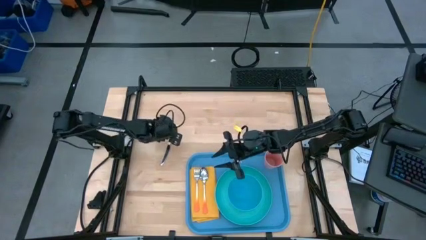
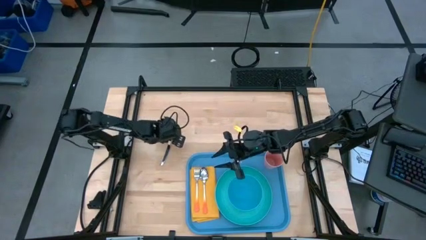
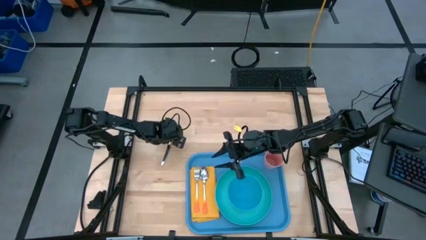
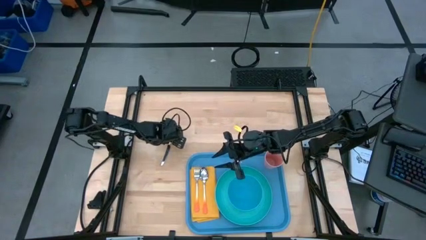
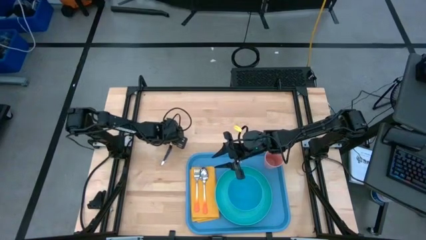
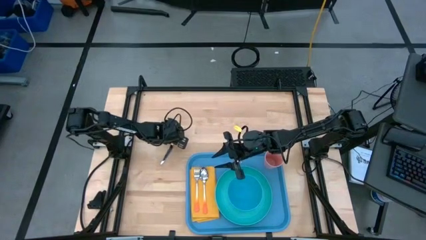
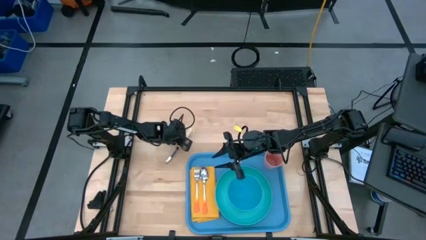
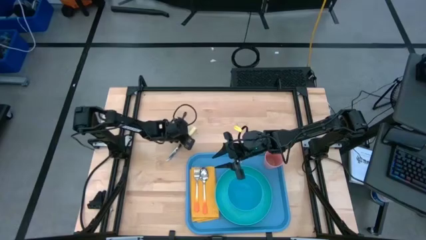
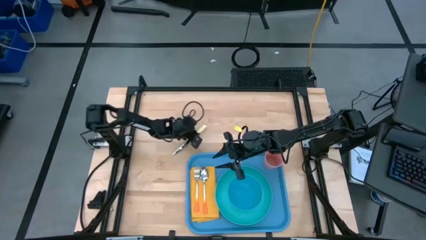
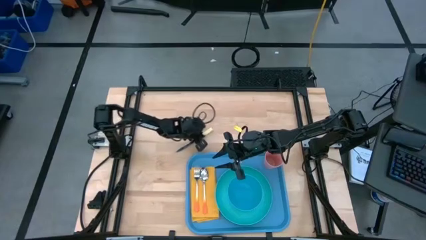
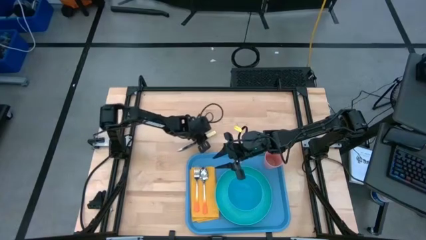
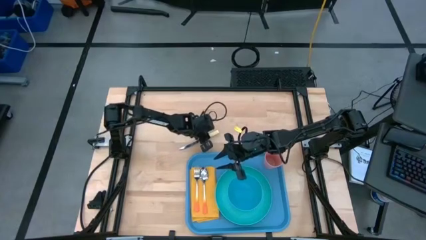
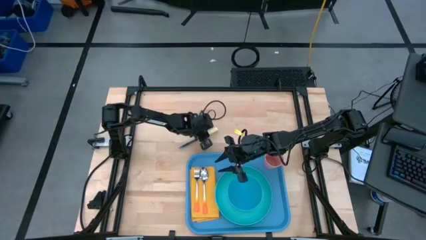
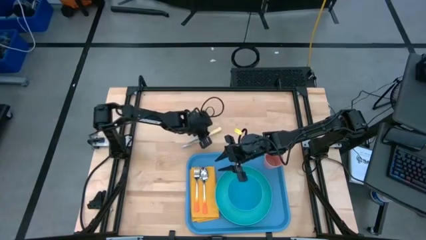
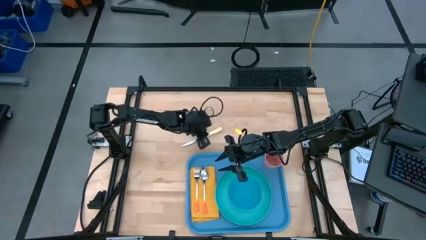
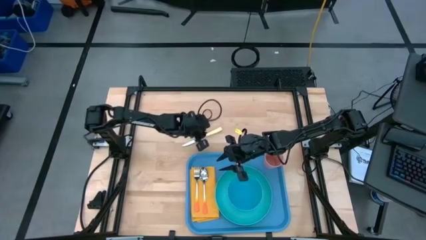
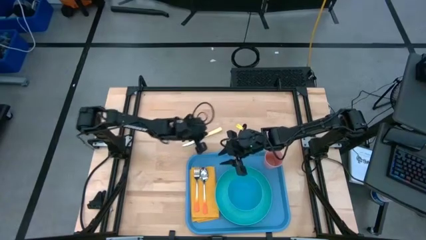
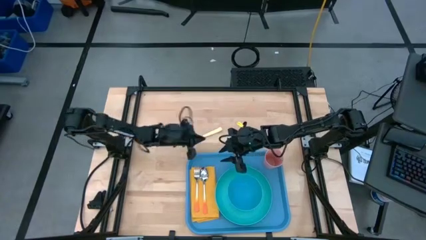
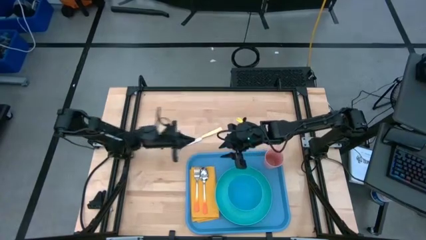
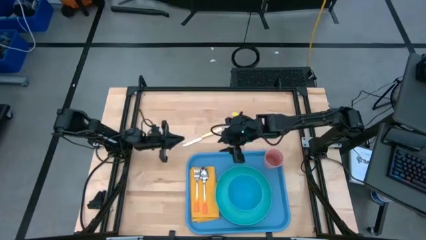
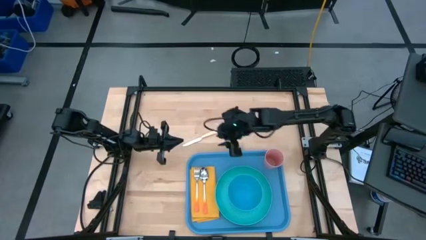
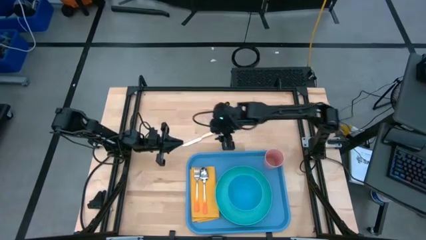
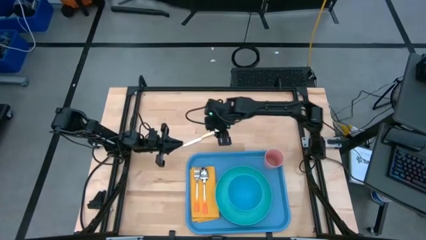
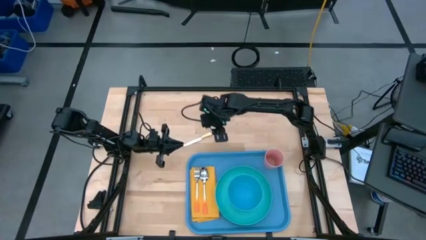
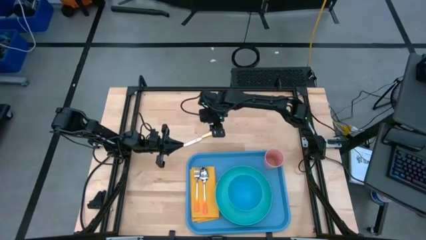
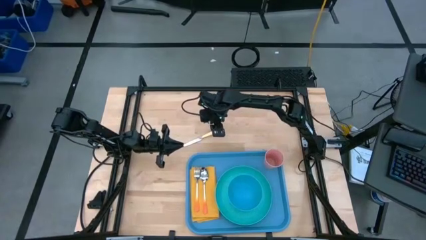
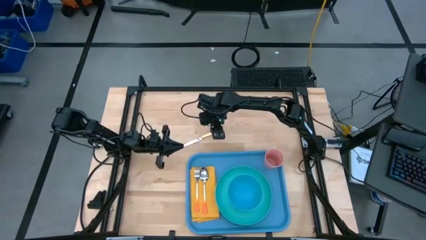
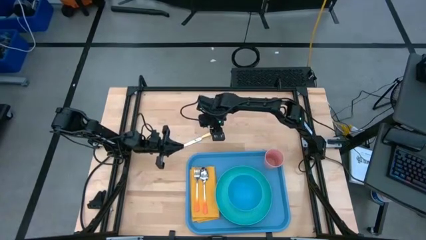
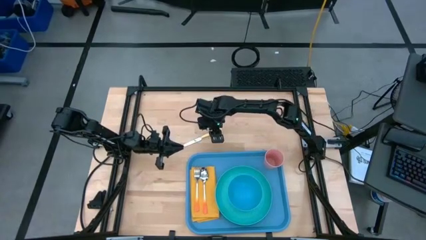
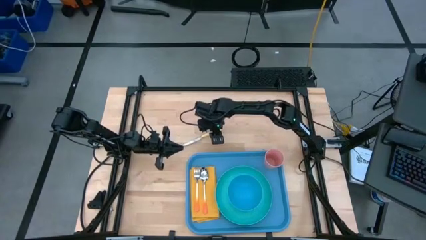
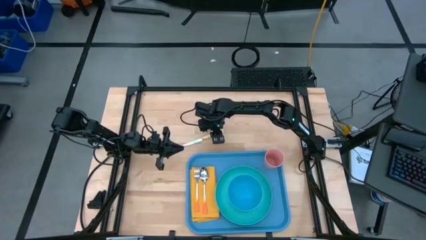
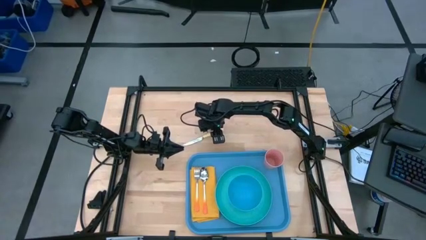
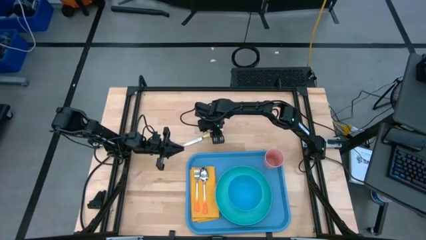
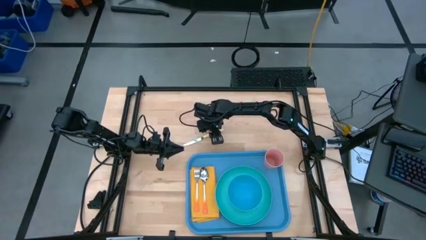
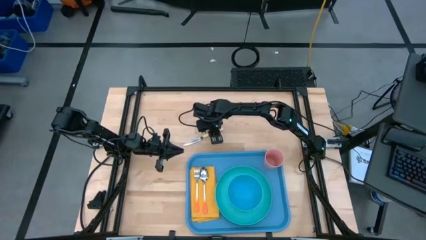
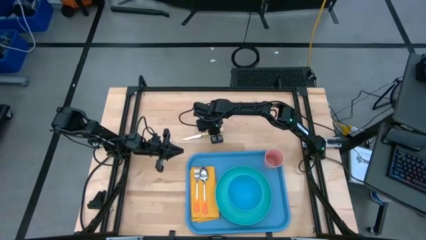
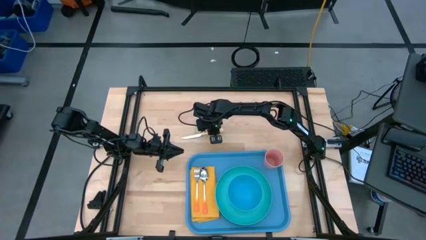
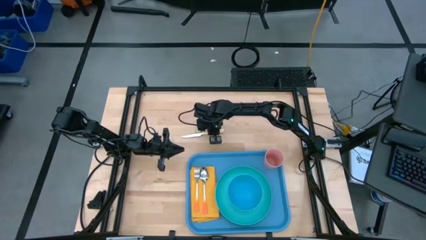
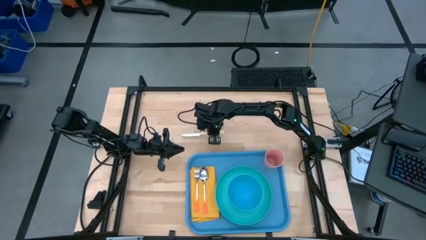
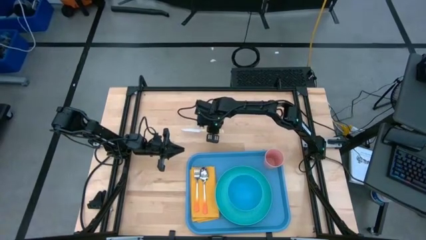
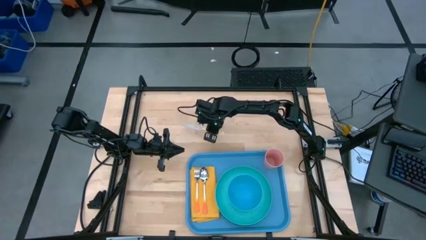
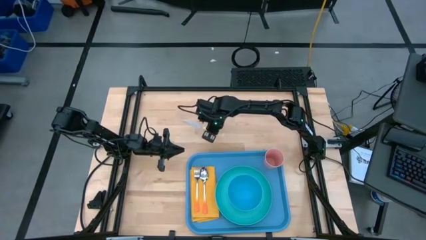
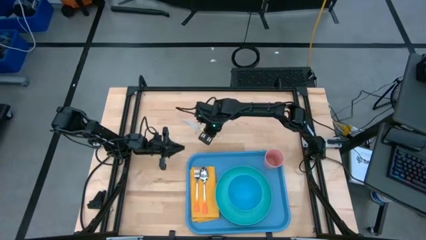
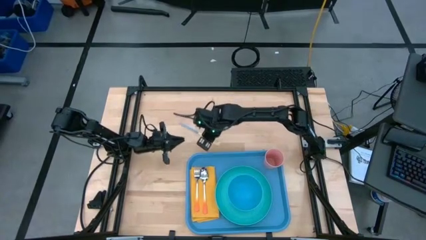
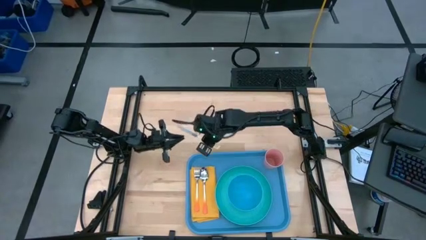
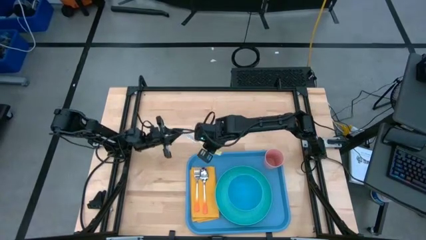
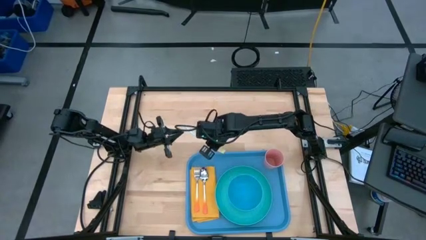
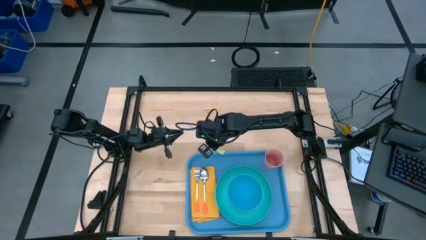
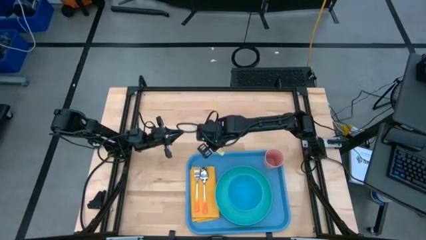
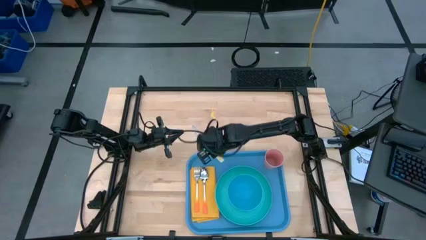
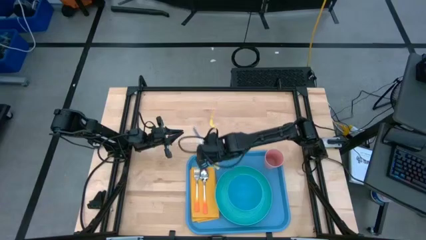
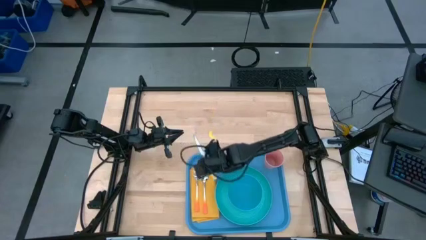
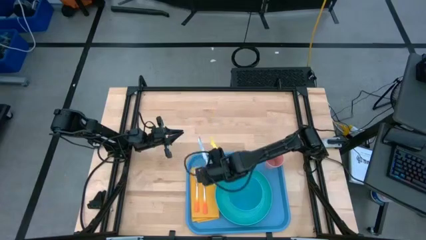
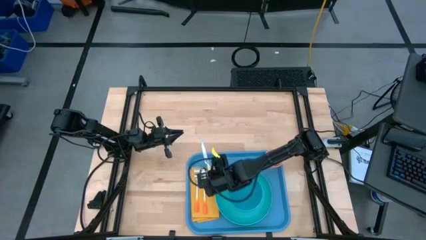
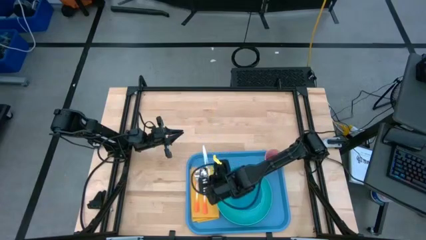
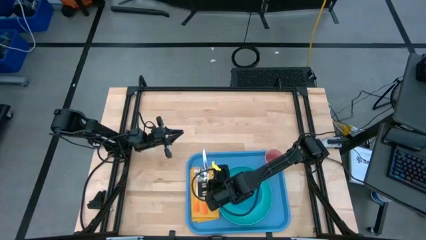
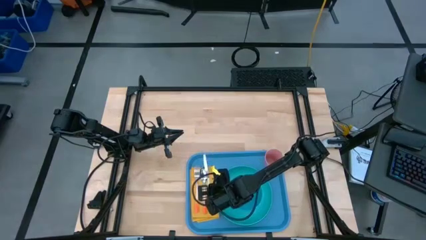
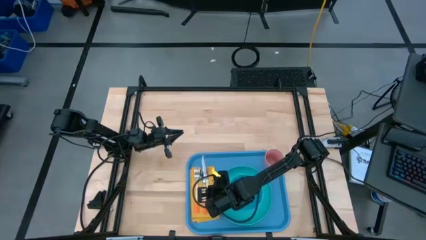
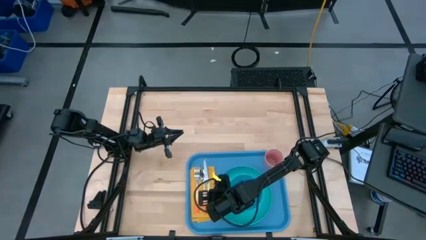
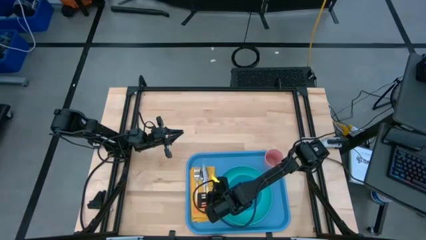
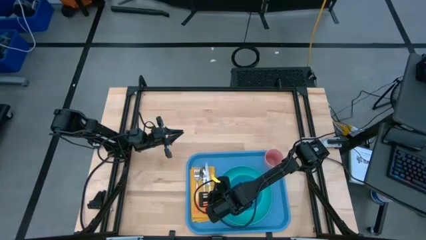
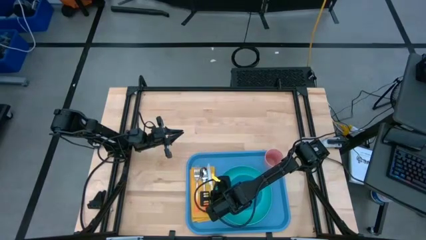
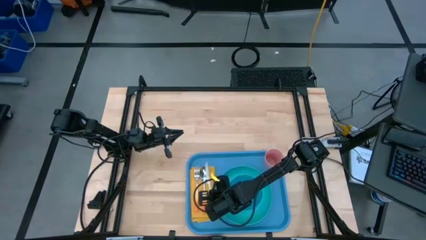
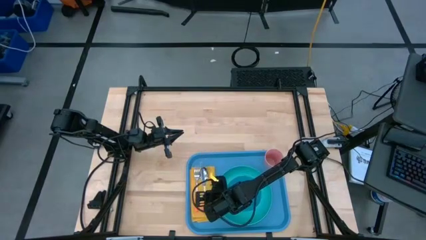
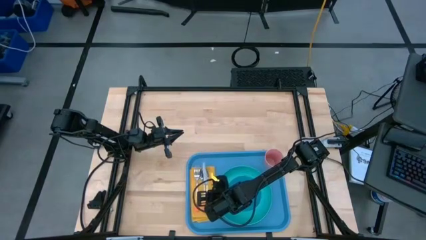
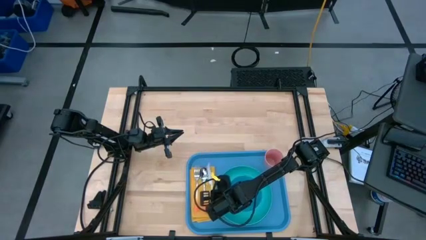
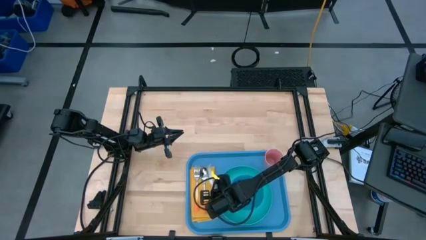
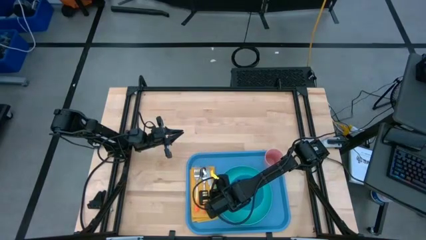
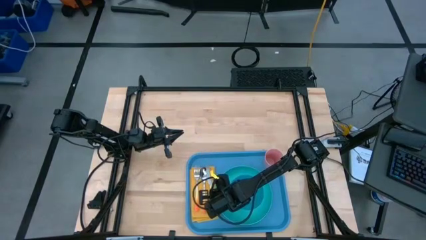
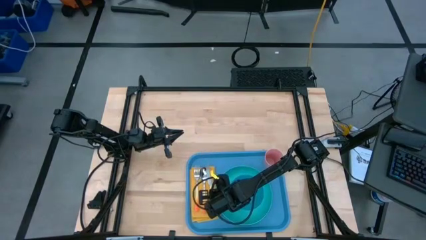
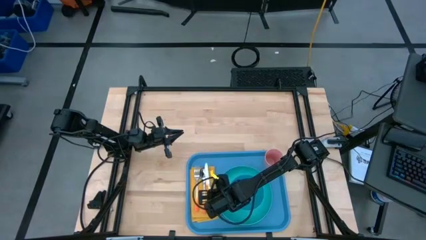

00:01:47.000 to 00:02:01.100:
Task: Set up tray
Put the yellow table knife on the orange table napkin to the right of the orange spoon

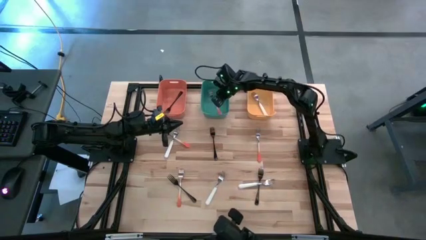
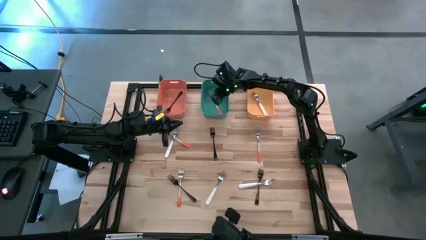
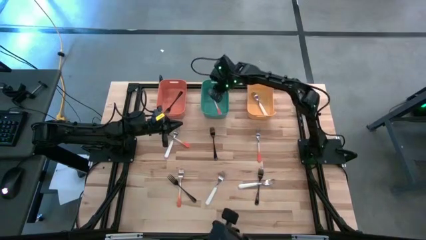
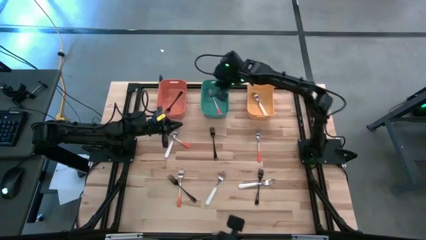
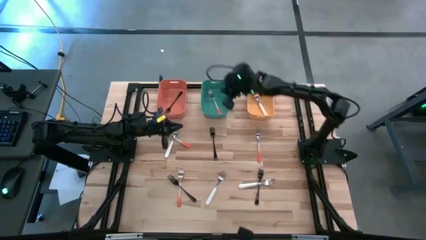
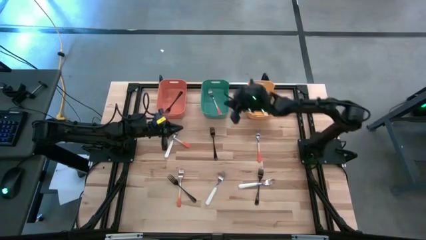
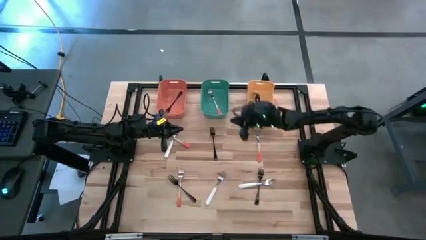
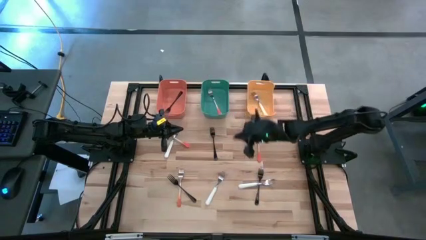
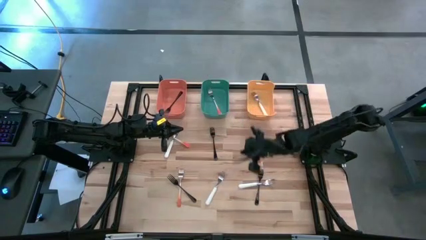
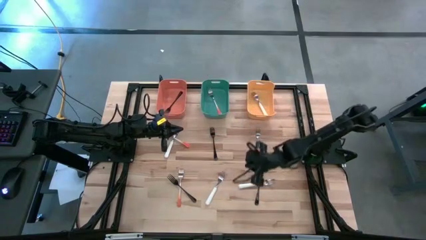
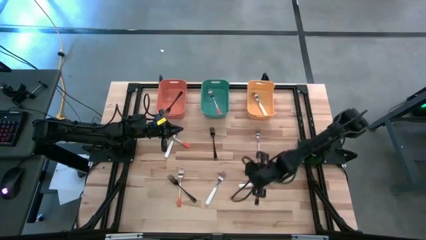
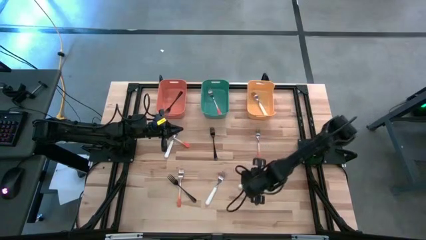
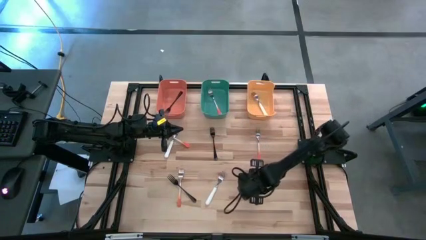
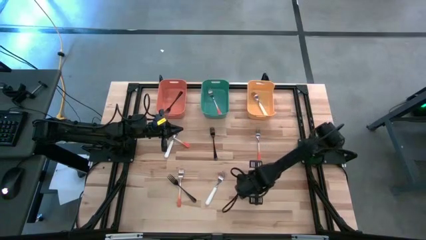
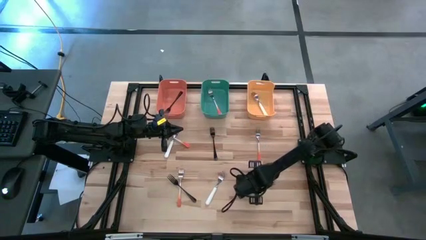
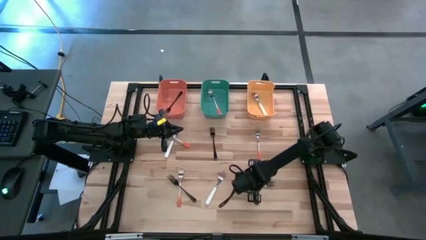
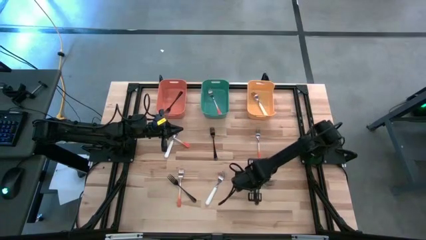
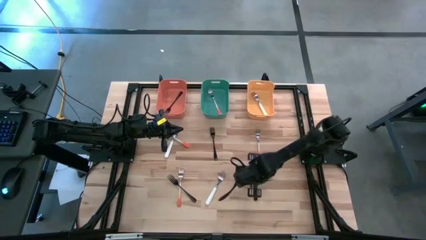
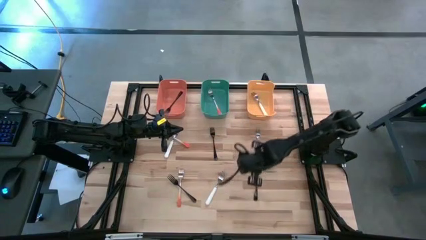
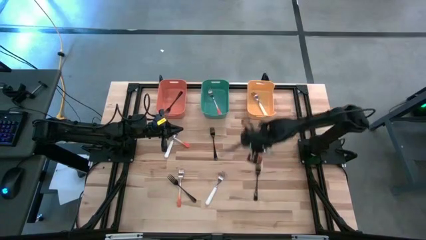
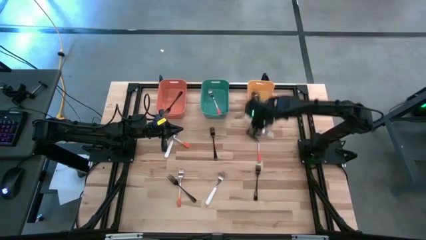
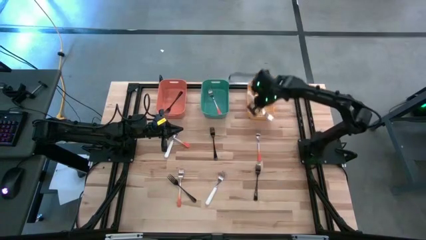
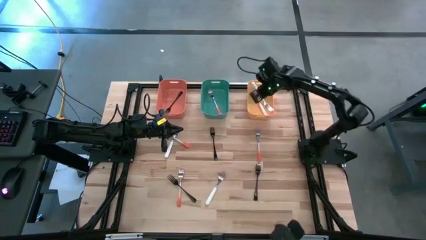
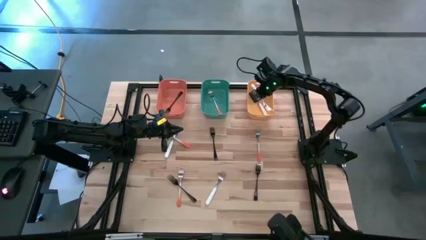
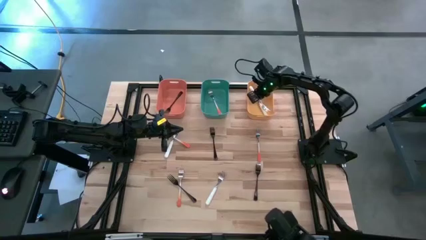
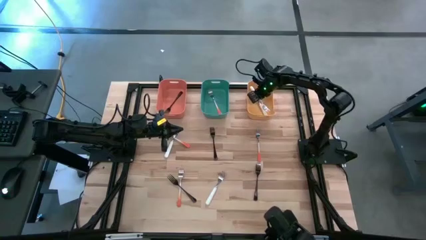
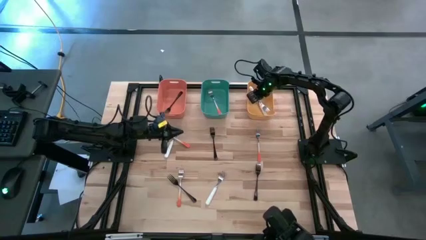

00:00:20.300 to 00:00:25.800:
Task: Sort silverware by color (type)
Put the bottom right white fork into the yellow bin
